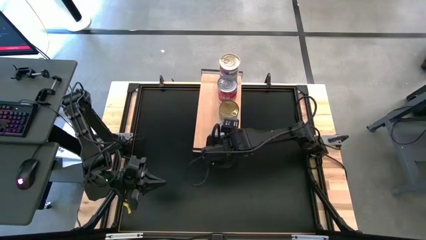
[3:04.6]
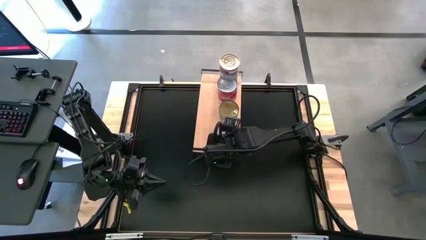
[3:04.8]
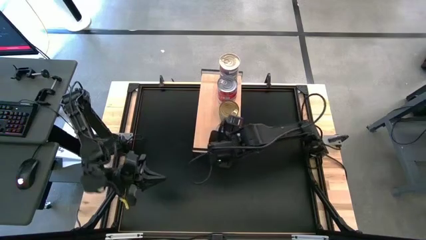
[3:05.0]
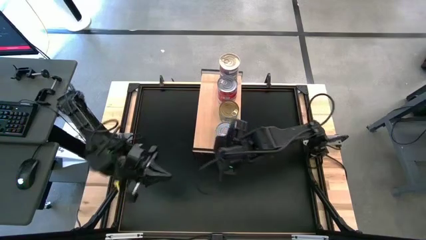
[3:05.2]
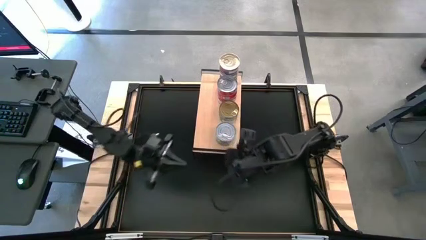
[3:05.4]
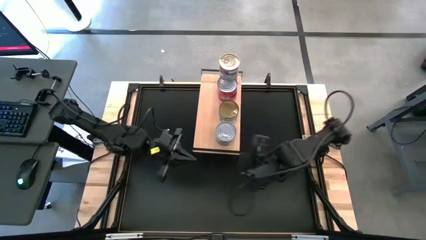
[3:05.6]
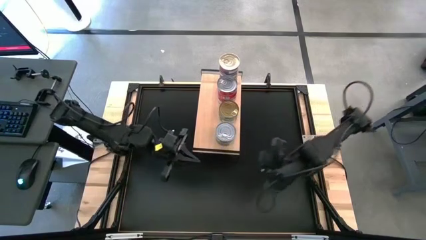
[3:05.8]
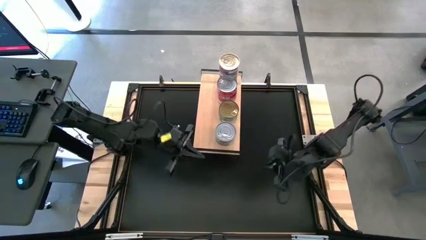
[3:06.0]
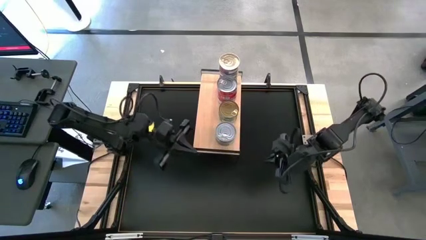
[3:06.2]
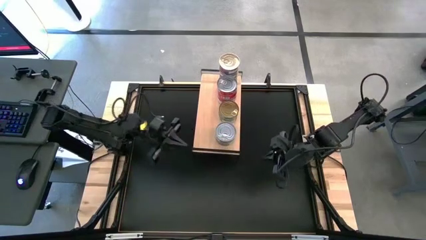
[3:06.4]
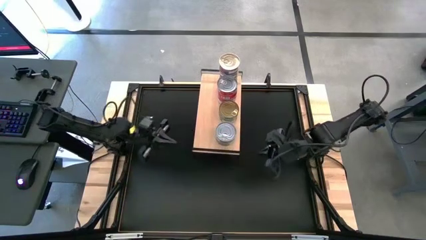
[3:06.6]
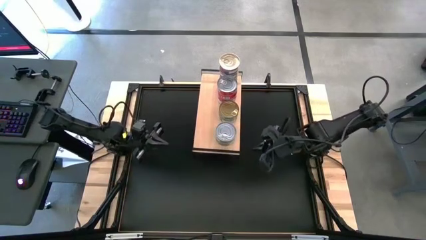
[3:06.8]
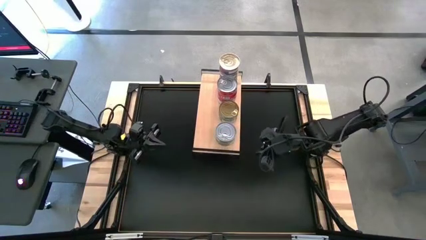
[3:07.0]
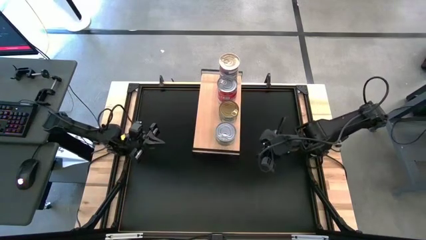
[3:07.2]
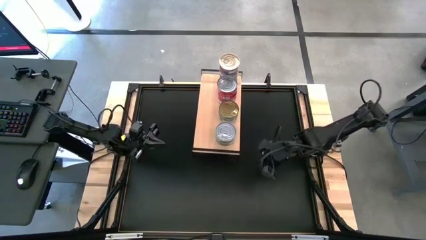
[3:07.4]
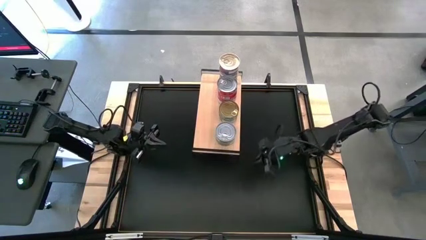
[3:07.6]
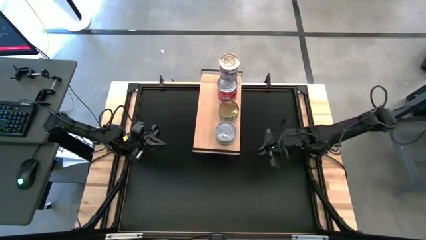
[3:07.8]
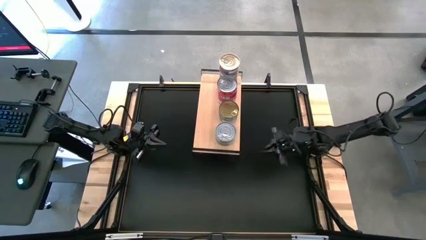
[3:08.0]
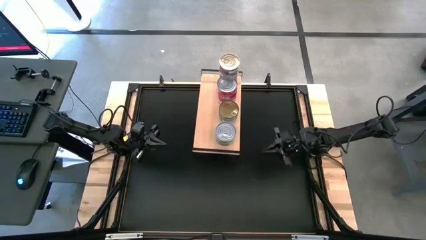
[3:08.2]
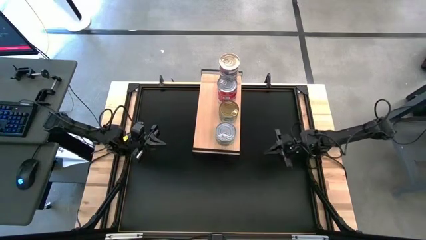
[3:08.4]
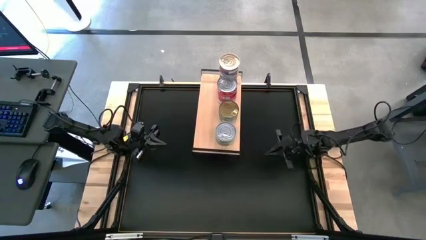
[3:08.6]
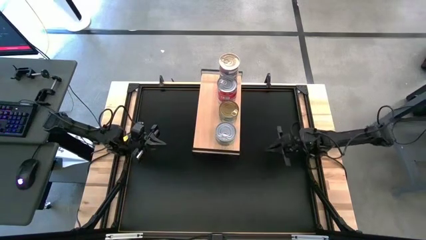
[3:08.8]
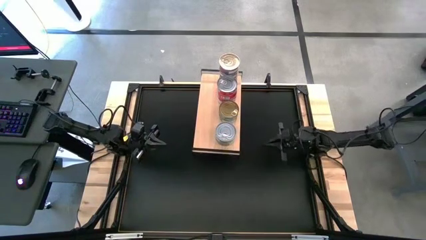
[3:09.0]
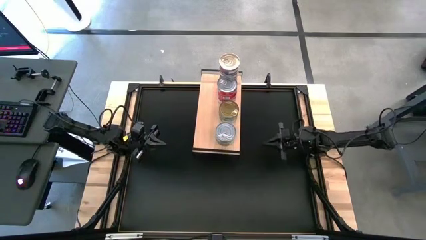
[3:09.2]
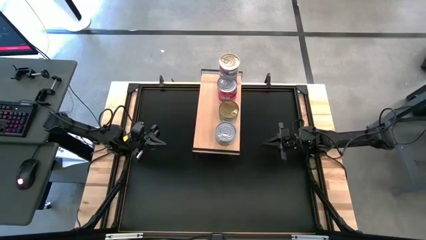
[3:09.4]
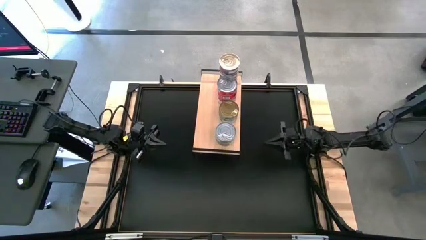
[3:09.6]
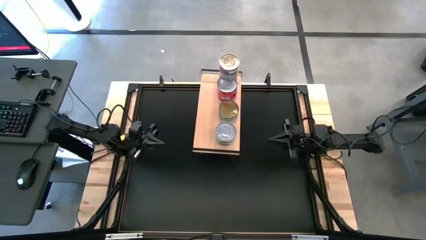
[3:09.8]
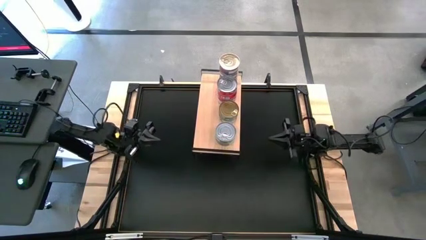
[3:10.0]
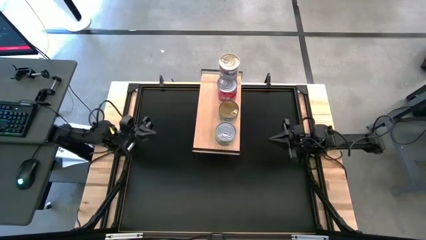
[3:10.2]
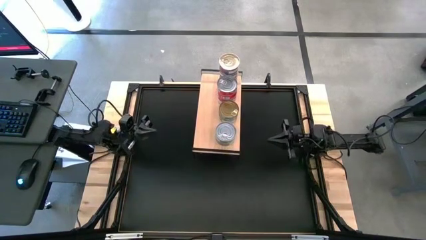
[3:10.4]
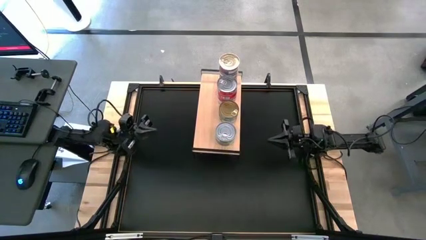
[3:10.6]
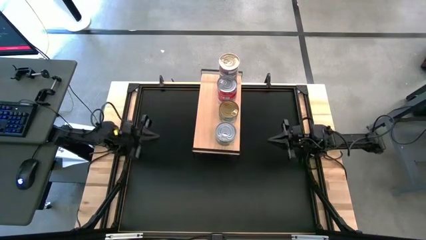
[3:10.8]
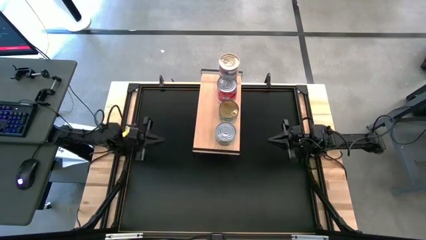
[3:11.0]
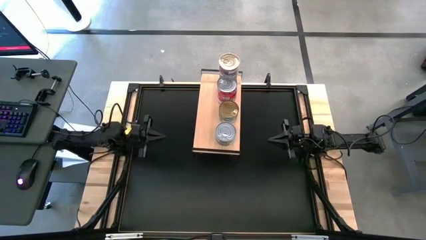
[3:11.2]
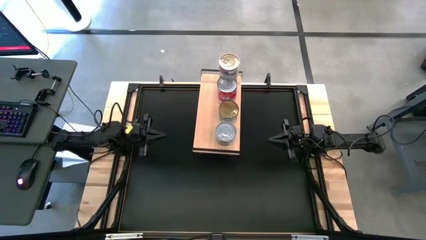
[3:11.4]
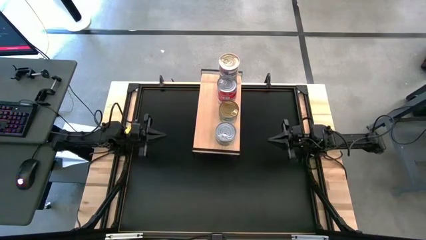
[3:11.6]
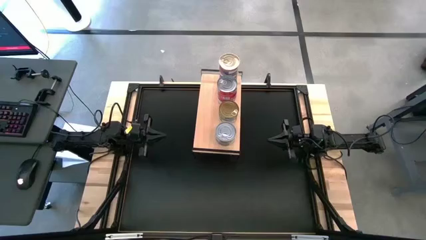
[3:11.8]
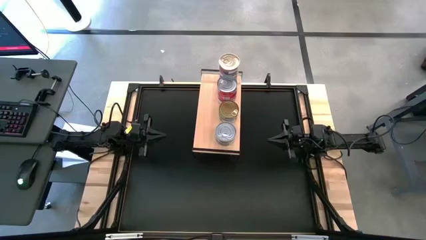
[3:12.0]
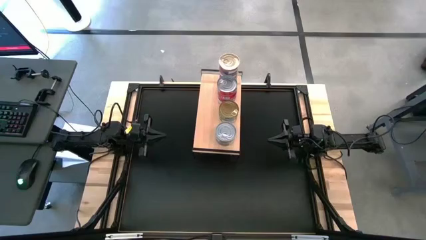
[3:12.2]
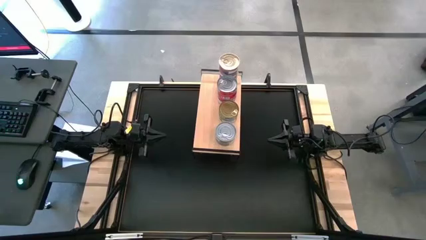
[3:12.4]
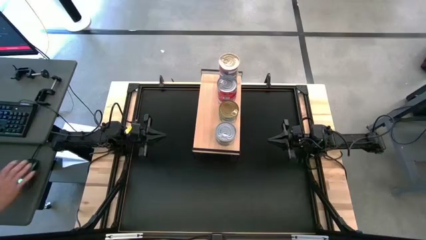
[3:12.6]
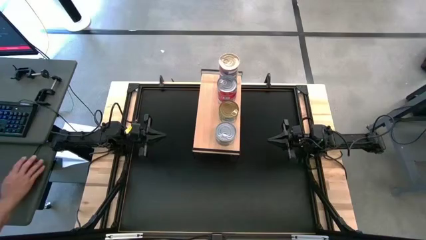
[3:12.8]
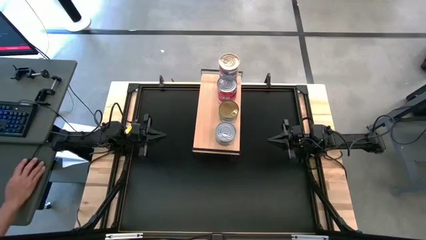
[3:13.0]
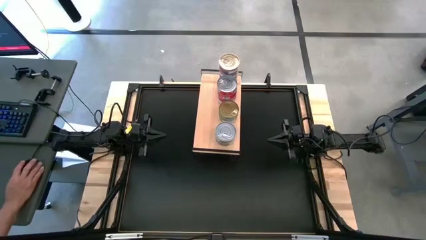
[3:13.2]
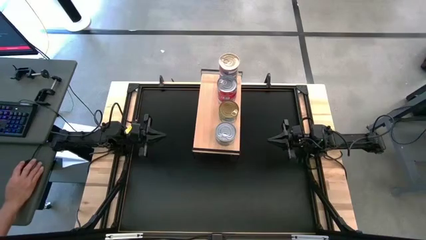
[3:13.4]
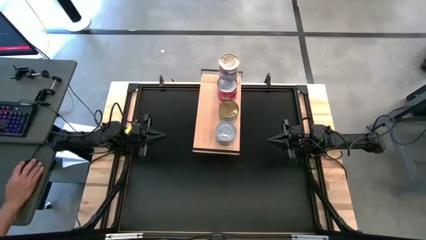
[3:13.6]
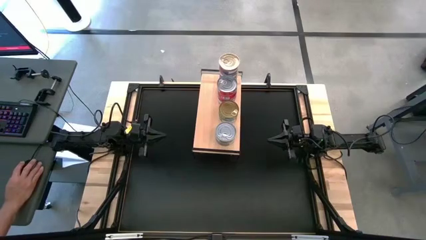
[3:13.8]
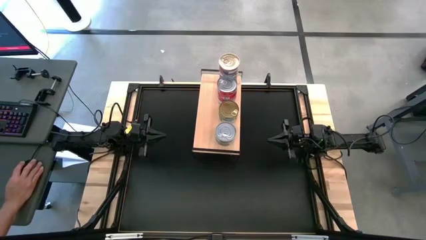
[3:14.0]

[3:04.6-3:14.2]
Task: Stack canned seafood by type on shelf
Return to Home Position

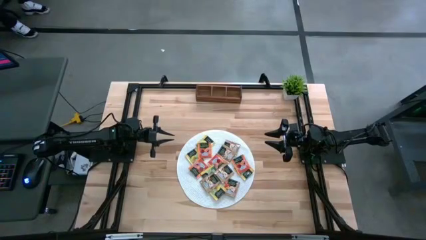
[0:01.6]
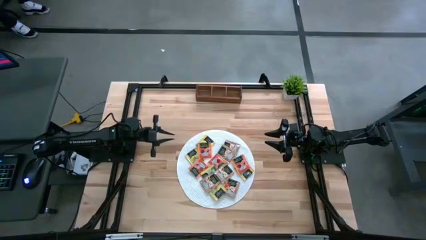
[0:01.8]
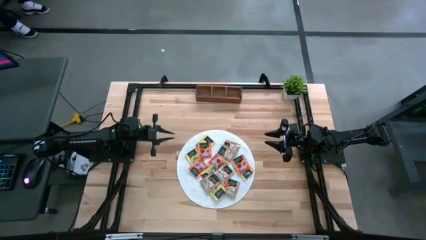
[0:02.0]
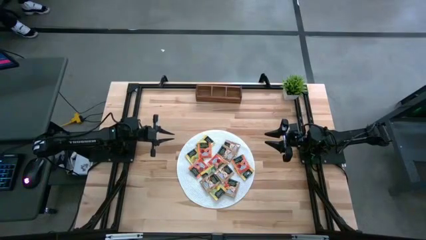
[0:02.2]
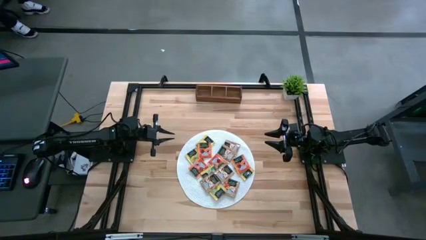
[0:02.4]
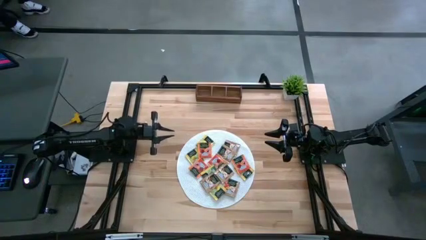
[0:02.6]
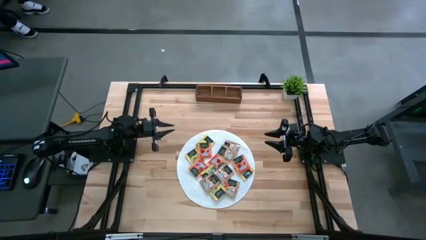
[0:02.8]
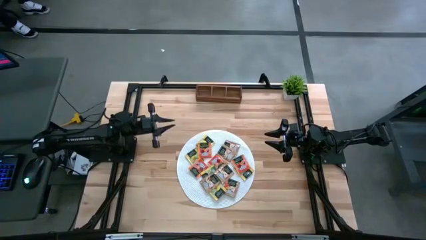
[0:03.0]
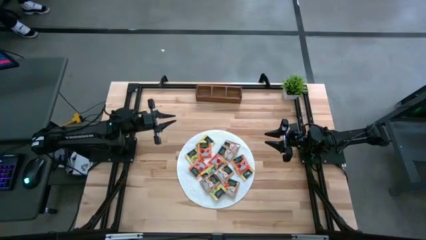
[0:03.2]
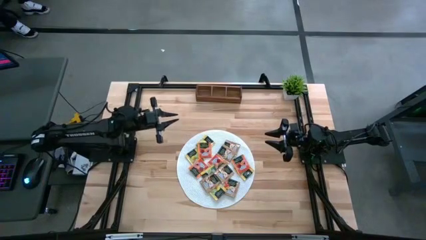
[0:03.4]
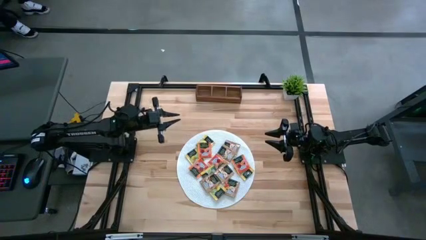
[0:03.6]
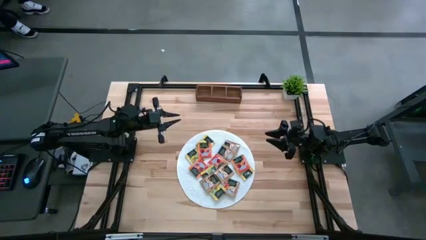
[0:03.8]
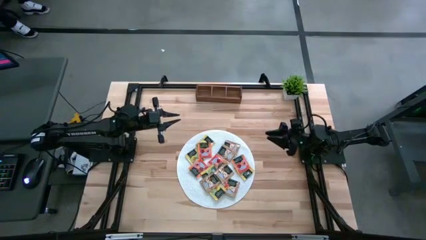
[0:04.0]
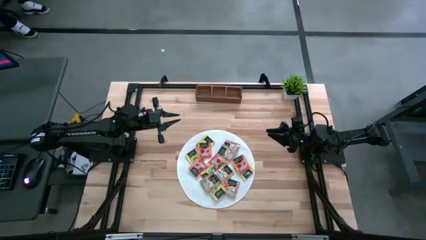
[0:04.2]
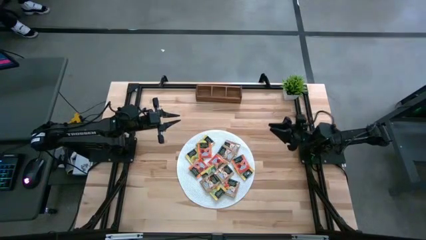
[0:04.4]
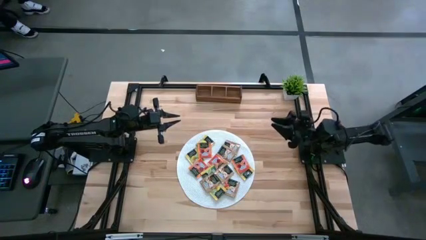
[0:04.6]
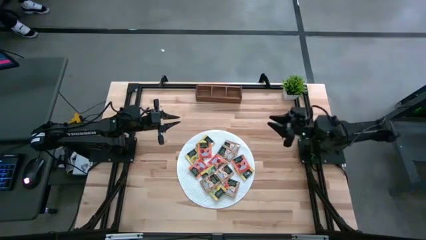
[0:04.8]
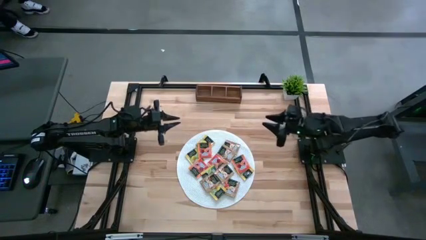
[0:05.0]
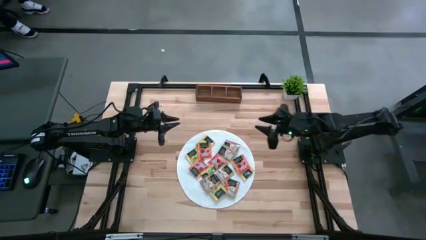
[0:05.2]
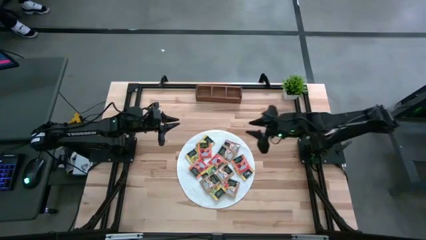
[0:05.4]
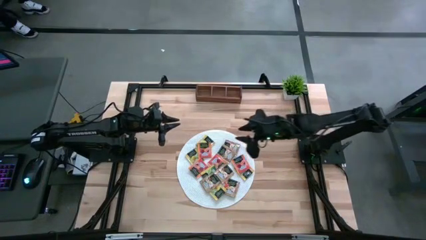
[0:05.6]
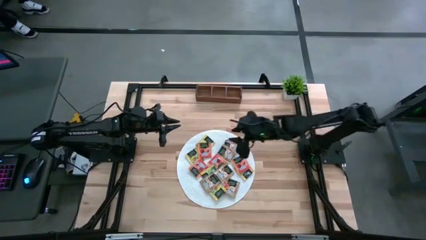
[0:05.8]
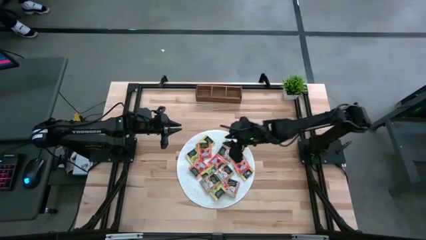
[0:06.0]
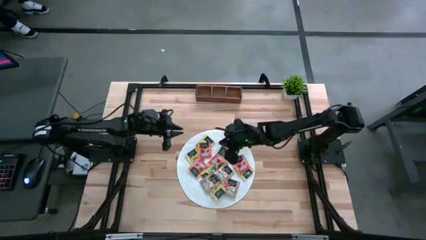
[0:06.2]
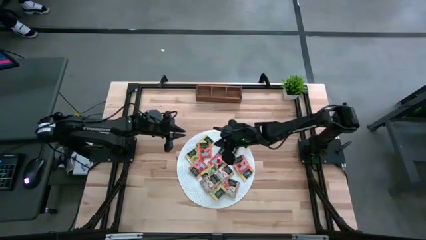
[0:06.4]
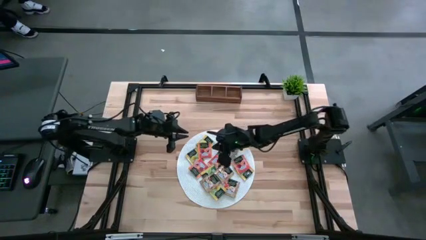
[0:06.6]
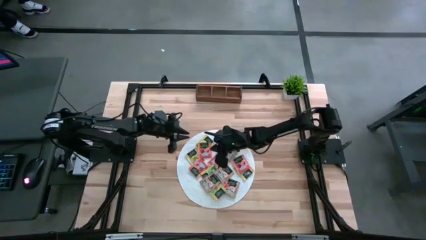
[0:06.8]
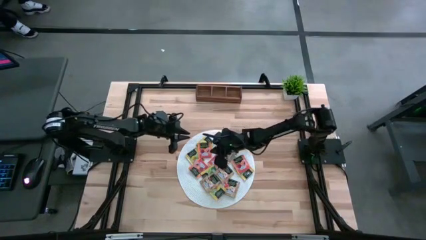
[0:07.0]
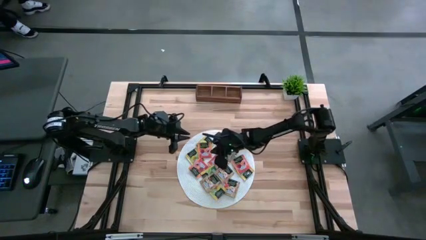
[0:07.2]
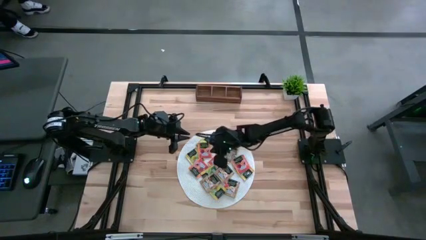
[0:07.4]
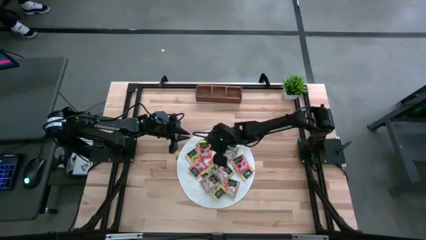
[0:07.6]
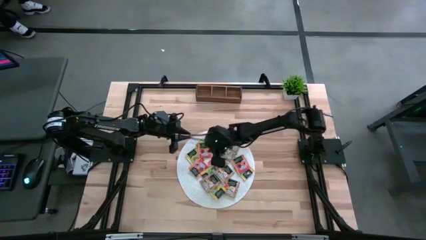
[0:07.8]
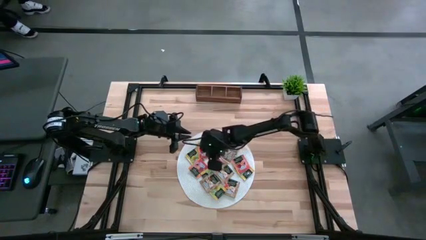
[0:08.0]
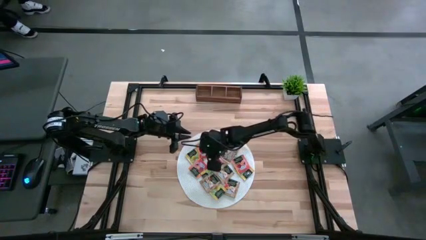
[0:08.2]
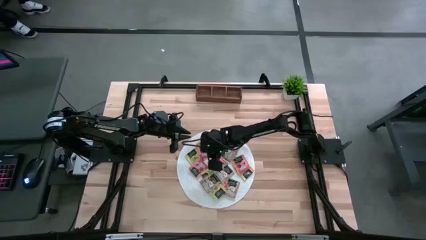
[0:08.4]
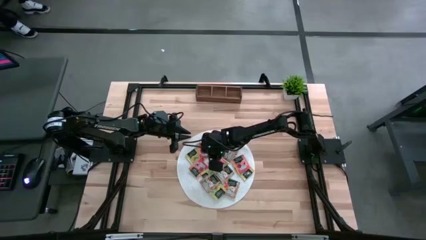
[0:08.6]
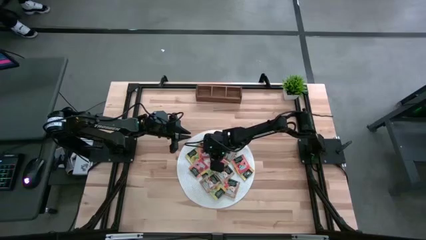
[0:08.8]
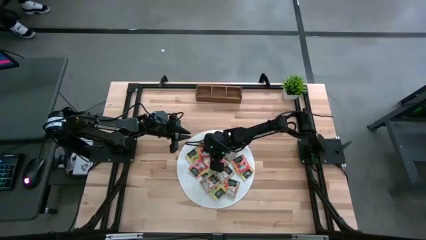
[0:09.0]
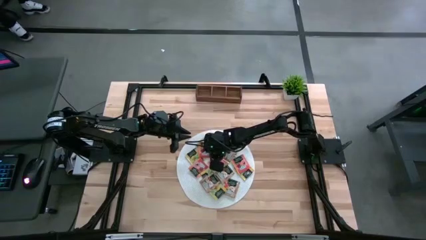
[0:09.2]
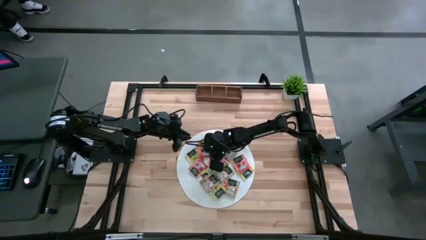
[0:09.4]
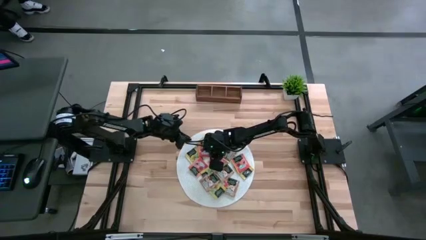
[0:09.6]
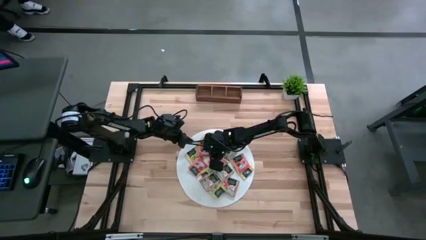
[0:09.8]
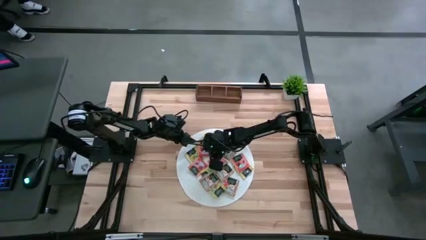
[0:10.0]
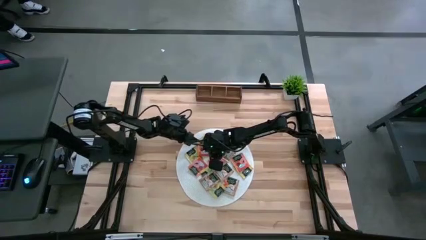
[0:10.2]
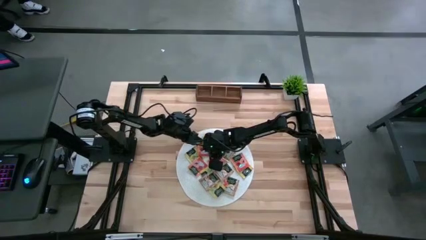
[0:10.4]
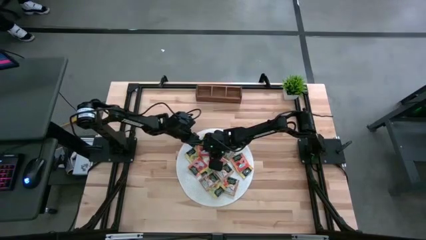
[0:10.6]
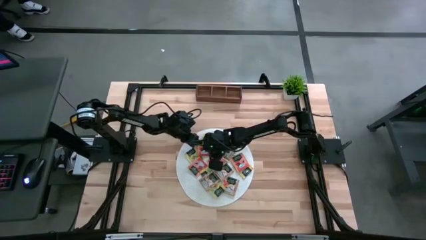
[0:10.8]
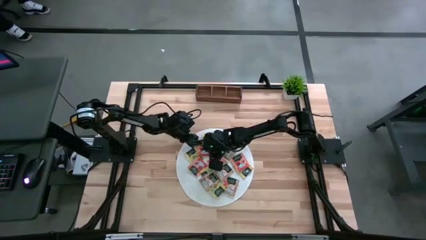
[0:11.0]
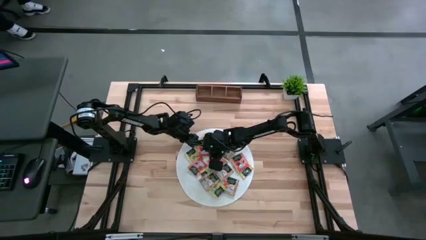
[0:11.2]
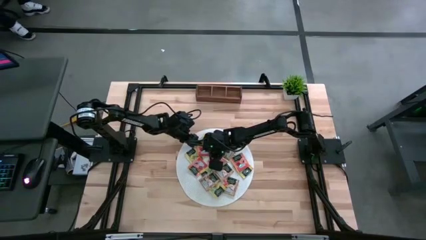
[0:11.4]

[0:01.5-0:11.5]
Task: Pick & Place Tea
Put the orange tea bag into the left section of the wooden organizer
